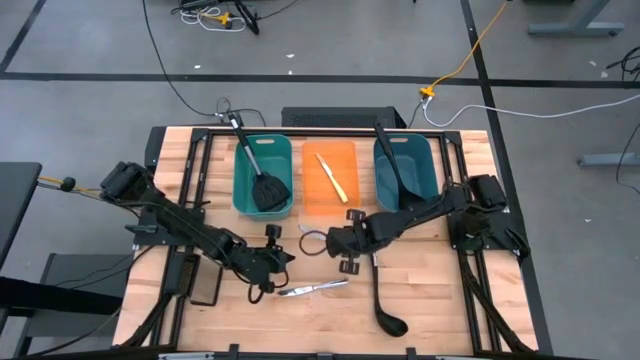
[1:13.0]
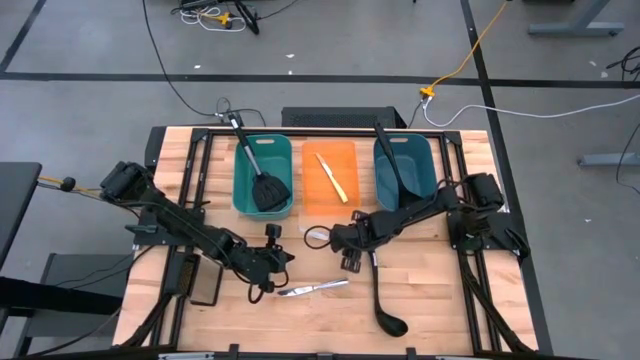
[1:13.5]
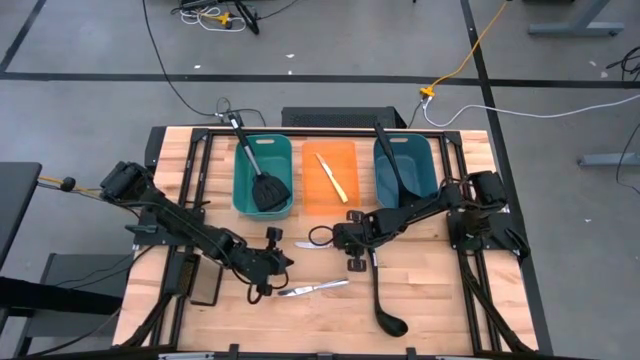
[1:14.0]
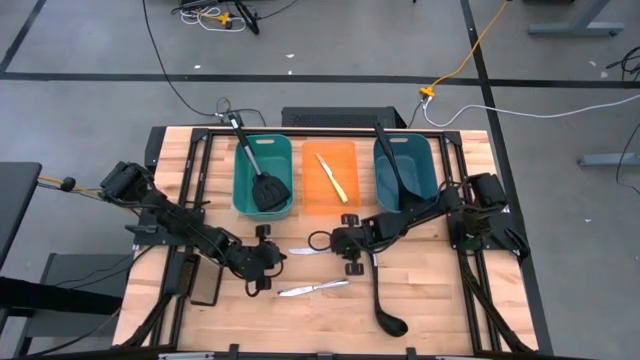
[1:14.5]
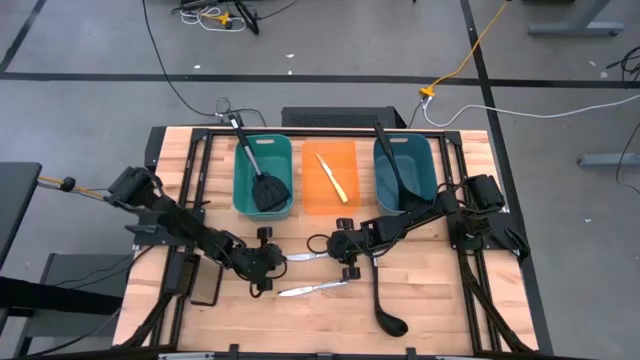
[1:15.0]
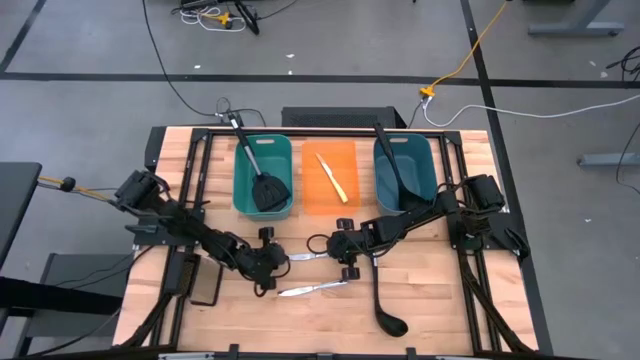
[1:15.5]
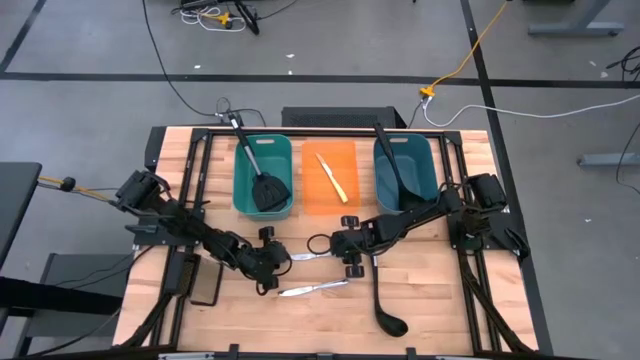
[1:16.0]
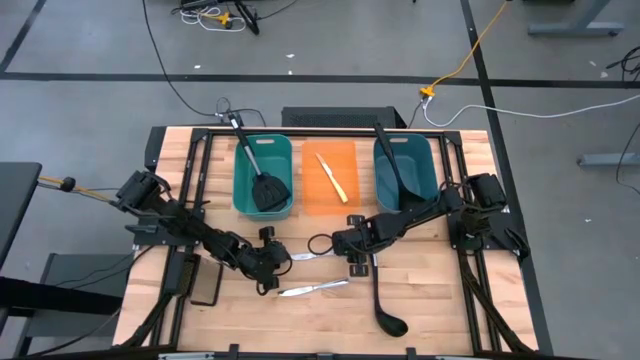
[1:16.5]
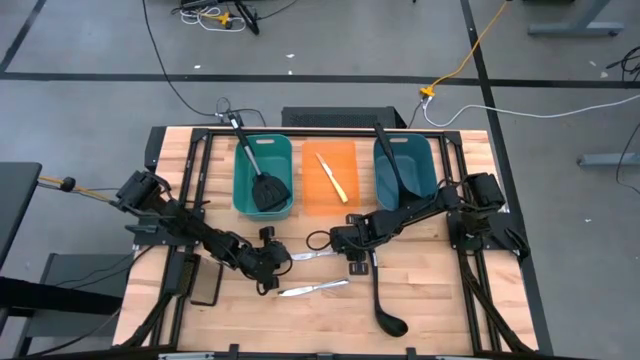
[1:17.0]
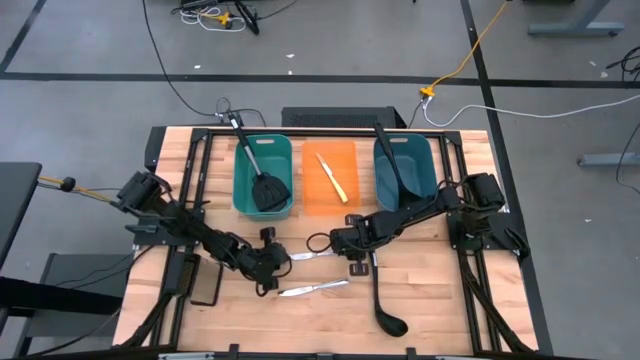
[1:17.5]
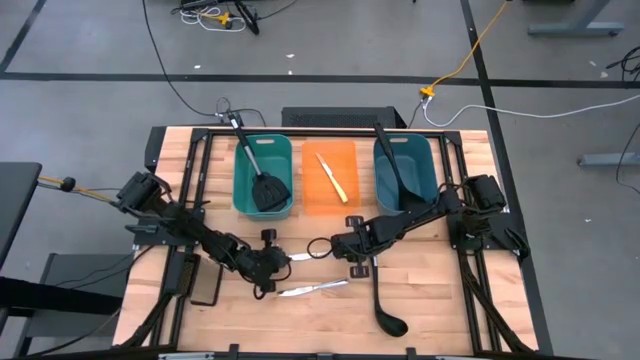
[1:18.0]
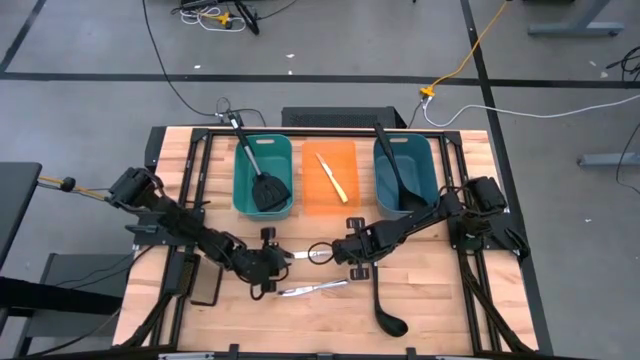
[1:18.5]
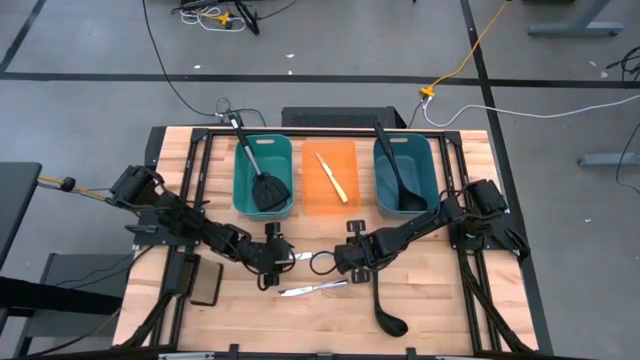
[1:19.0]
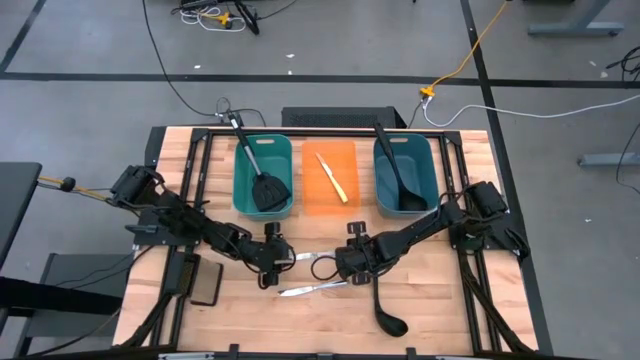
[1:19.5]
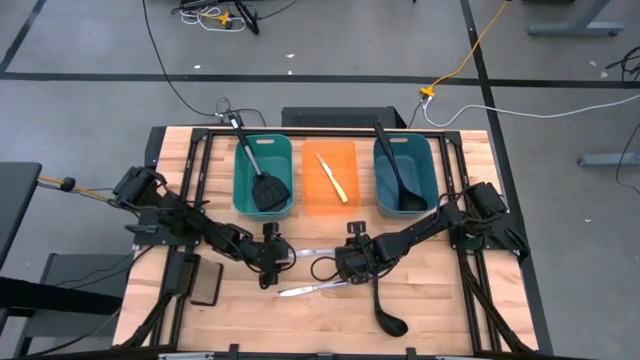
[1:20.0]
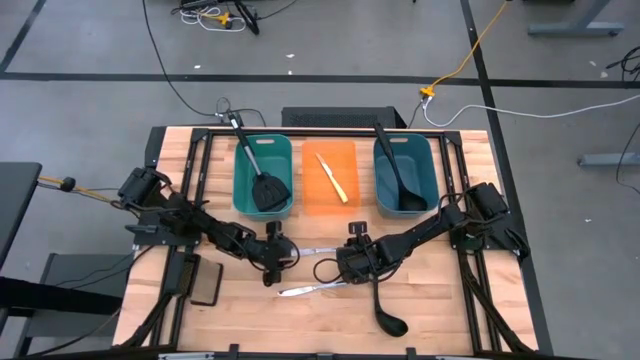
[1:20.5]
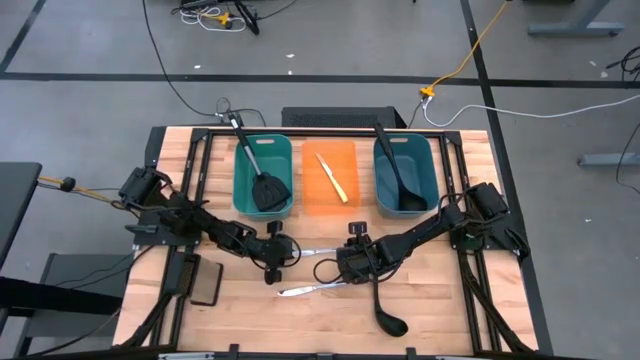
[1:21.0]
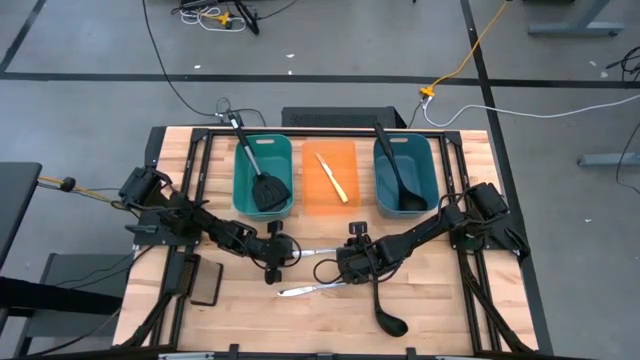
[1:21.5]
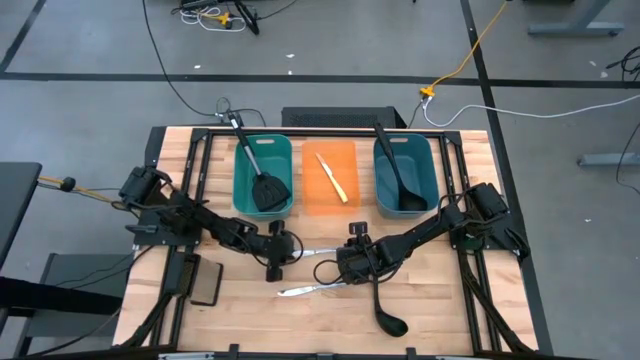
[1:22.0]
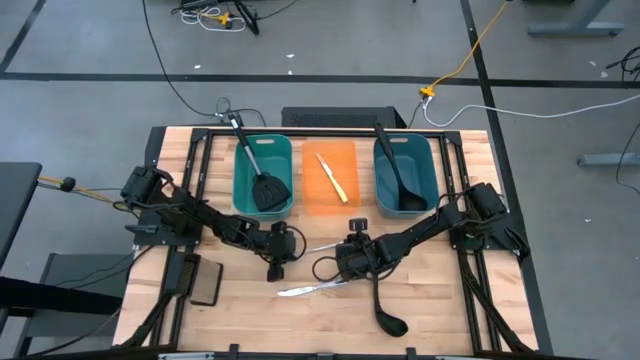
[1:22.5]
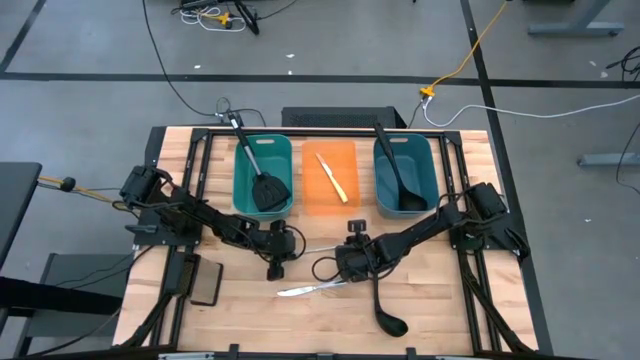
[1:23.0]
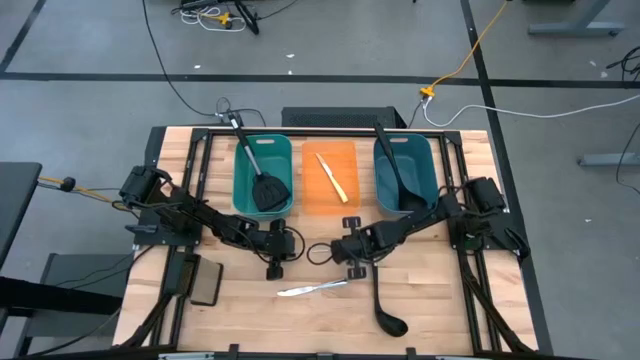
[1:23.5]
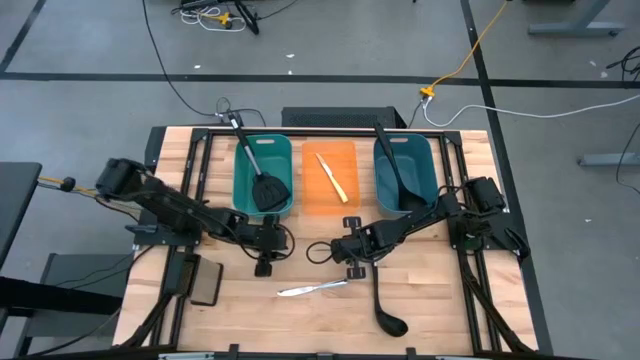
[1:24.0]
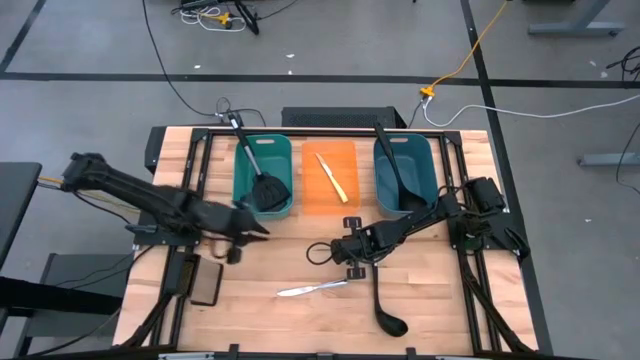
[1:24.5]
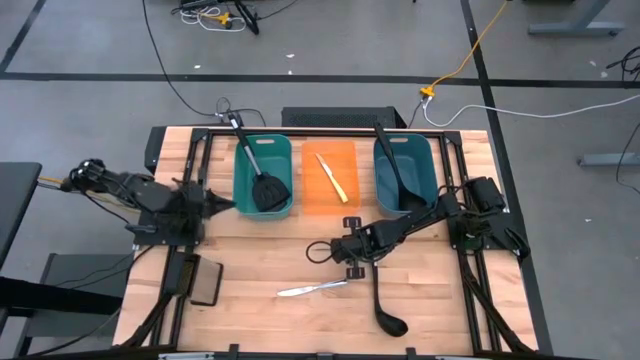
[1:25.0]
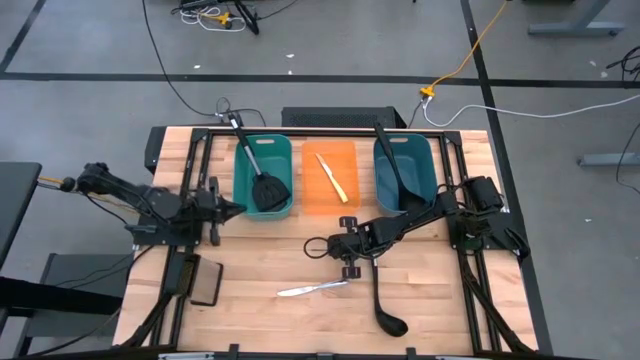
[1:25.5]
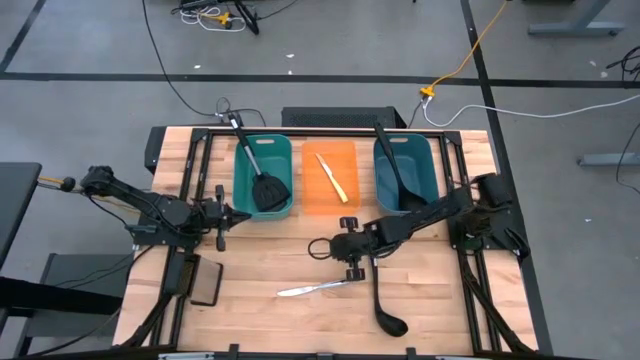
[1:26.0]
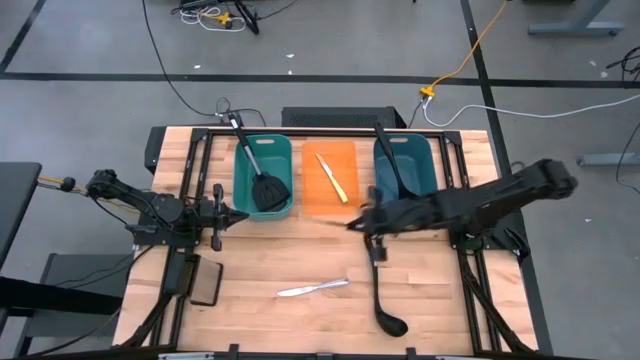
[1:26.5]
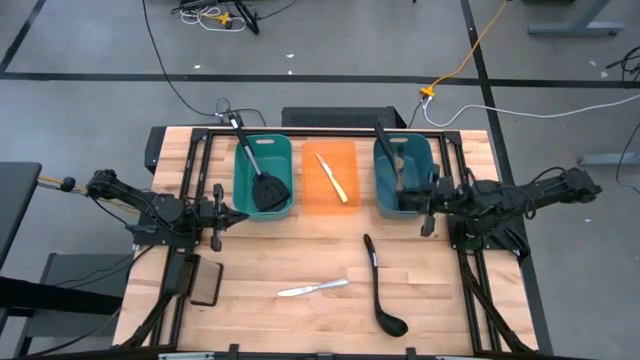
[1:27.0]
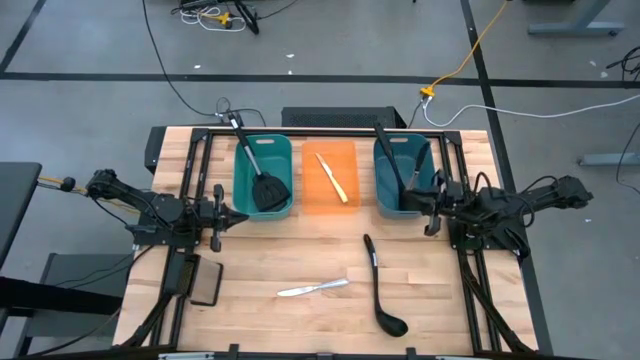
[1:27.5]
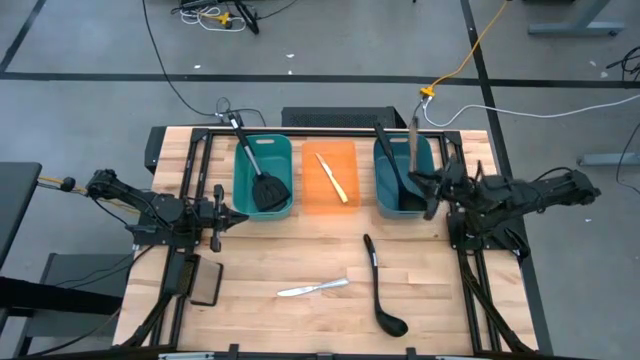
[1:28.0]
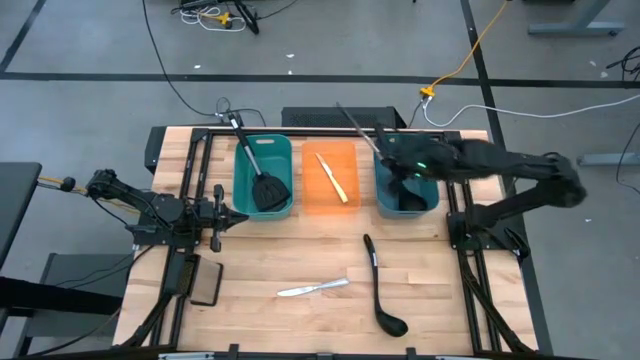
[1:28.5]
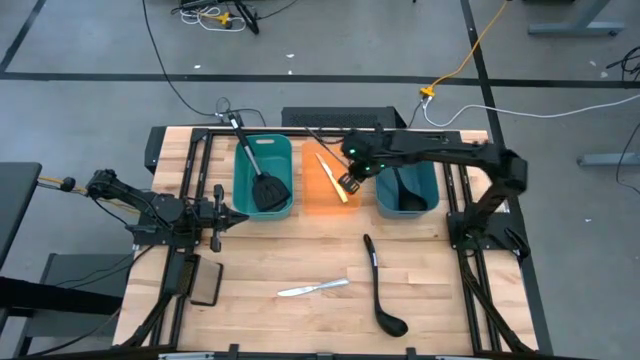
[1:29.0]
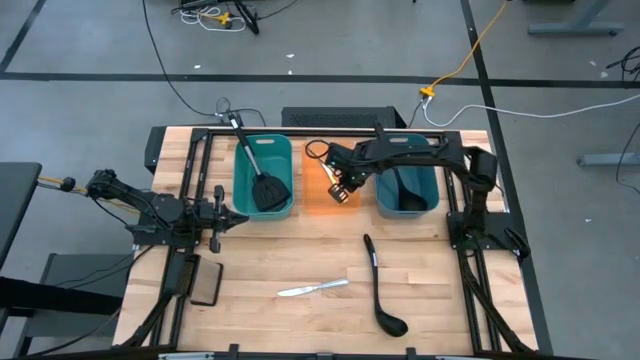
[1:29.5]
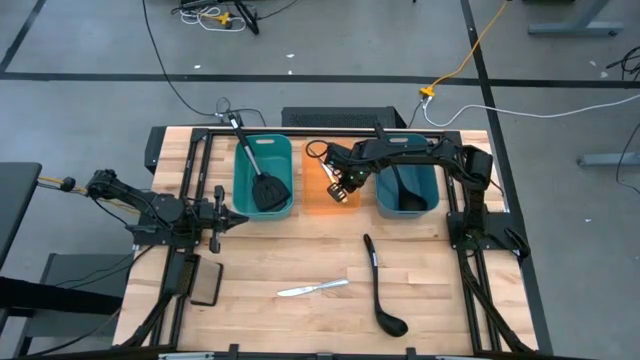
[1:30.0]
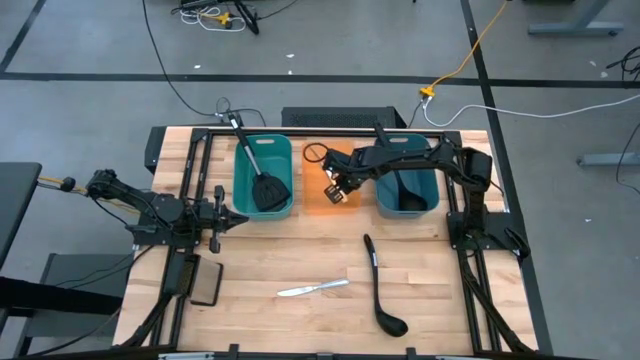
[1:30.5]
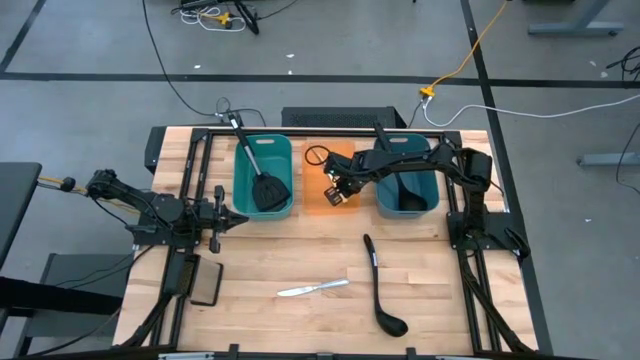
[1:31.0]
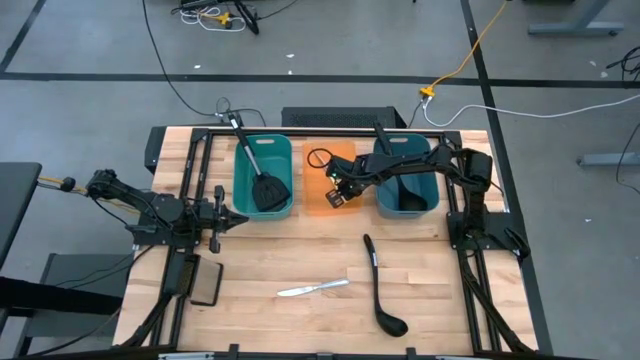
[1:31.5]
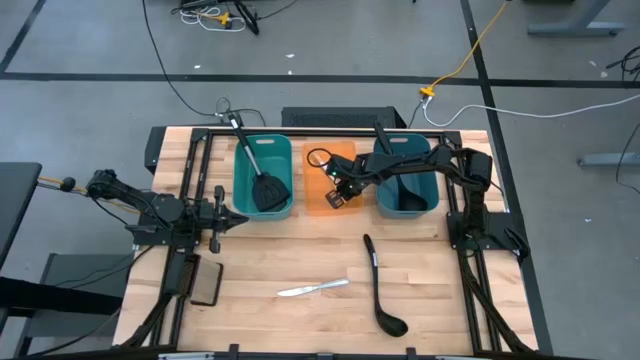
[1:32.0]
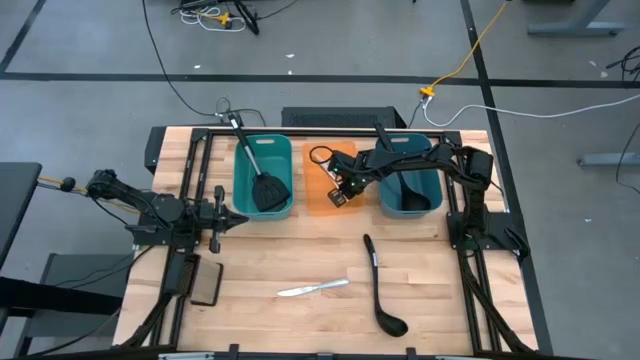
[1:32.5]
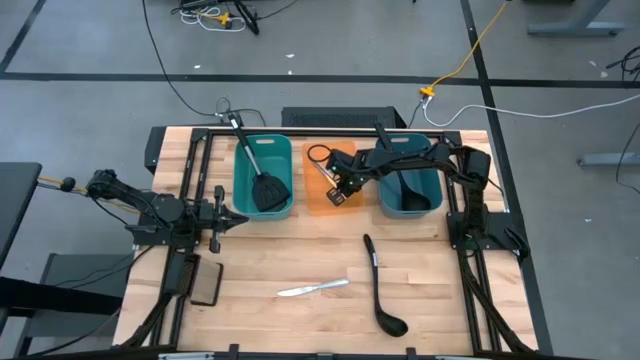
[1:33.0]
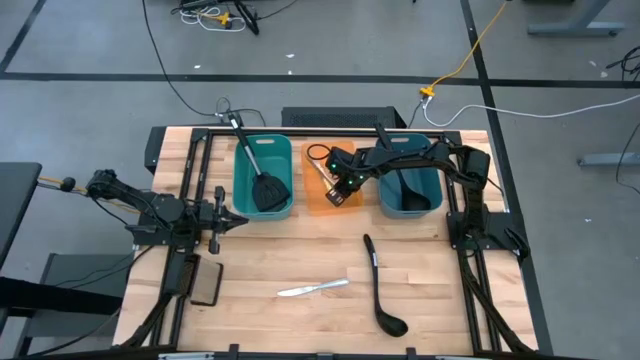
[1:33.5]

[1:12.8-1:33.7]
Task: Pick & Place Kitchen Items
Put the top silver knife into the orange bin
